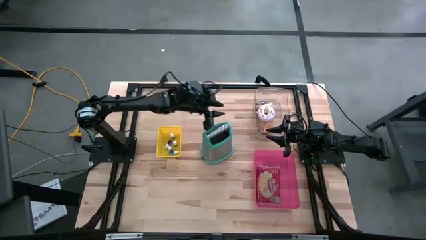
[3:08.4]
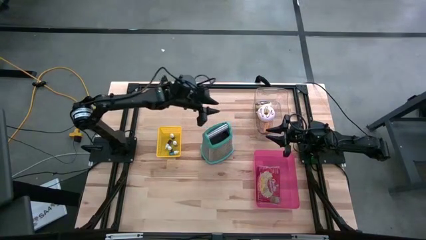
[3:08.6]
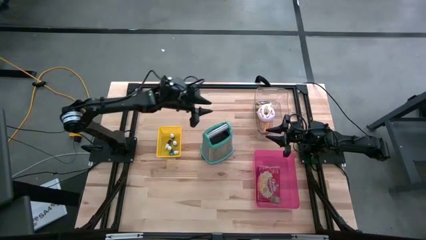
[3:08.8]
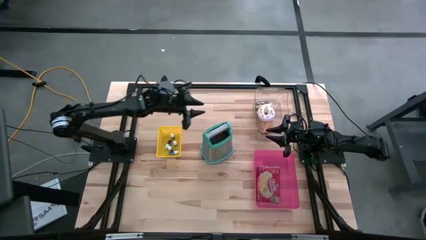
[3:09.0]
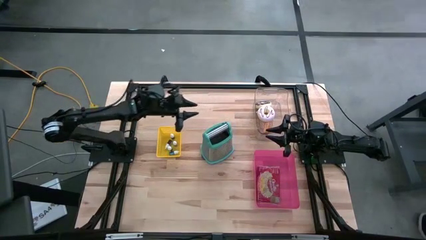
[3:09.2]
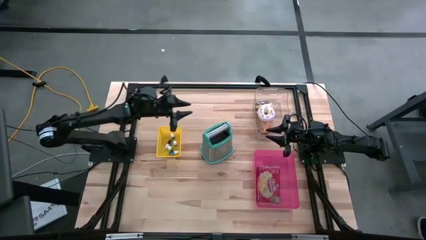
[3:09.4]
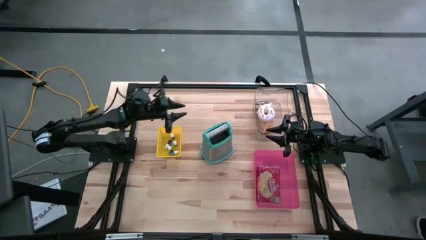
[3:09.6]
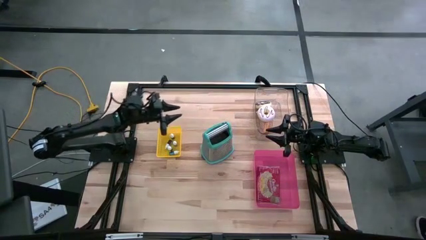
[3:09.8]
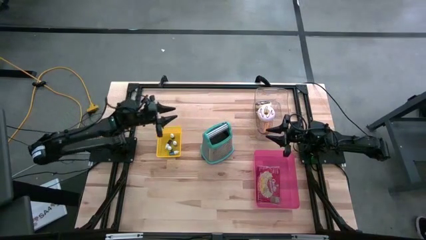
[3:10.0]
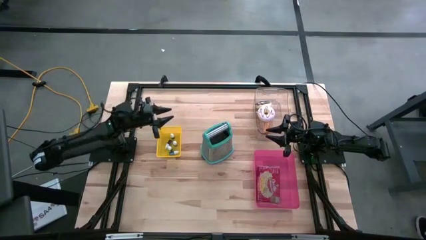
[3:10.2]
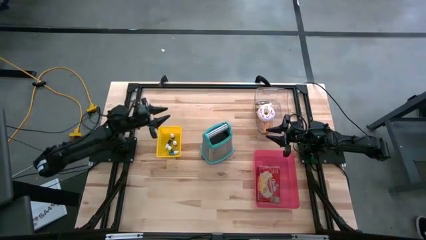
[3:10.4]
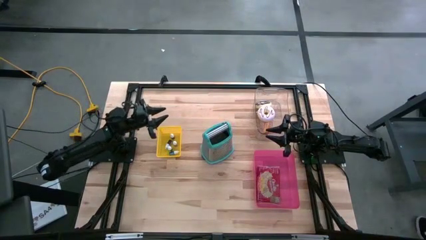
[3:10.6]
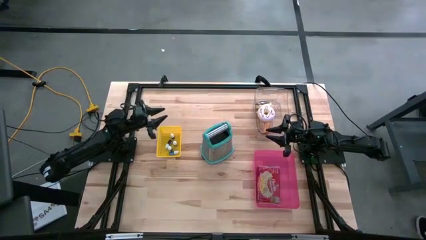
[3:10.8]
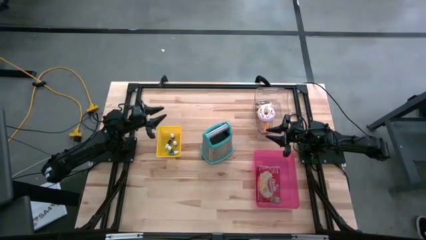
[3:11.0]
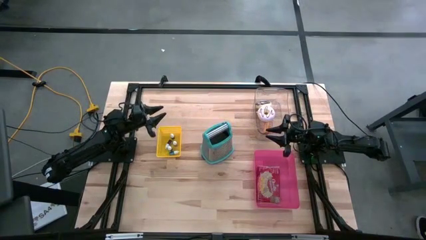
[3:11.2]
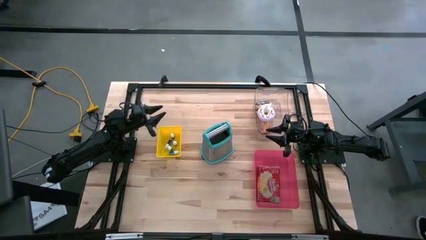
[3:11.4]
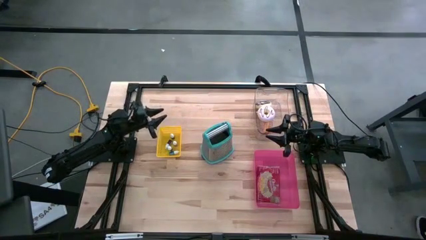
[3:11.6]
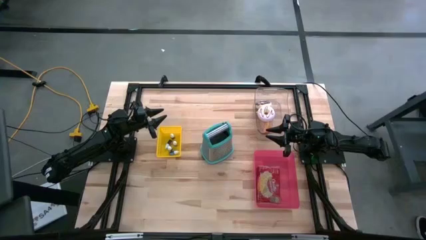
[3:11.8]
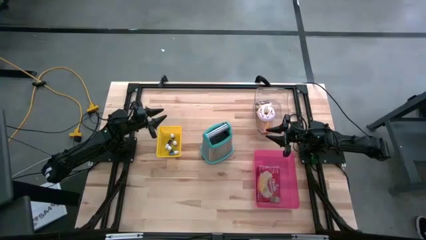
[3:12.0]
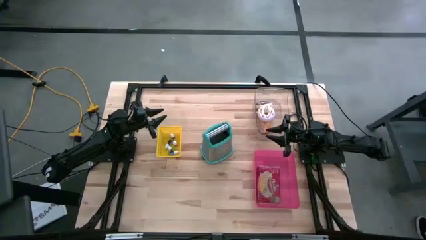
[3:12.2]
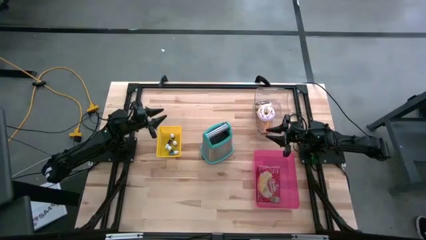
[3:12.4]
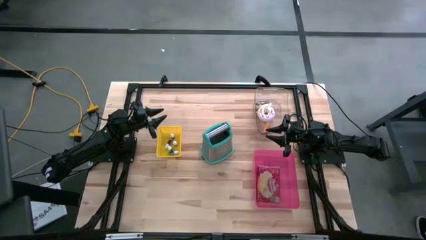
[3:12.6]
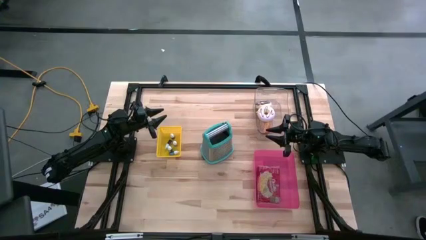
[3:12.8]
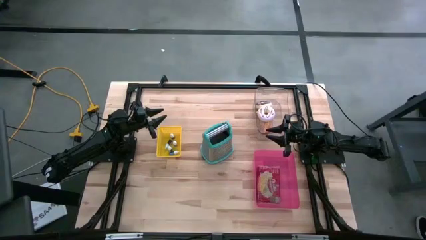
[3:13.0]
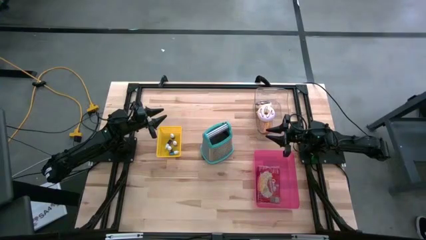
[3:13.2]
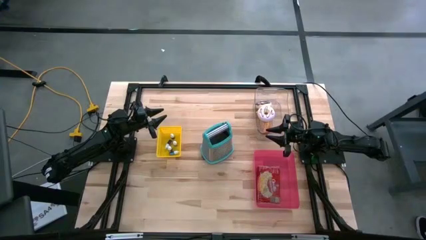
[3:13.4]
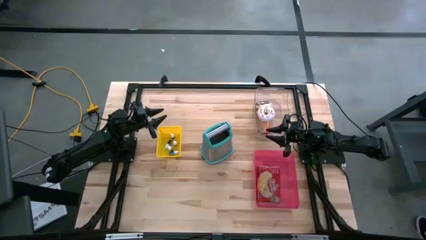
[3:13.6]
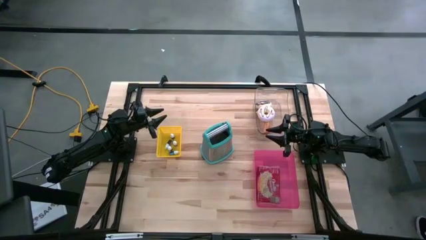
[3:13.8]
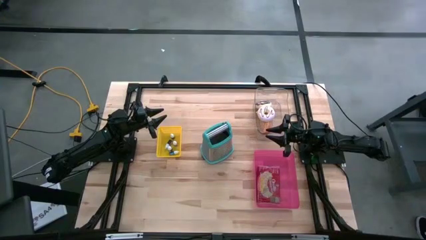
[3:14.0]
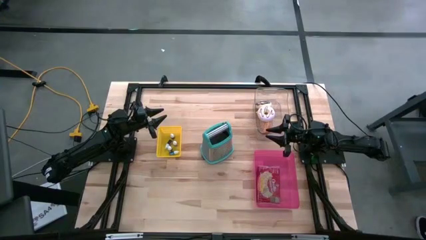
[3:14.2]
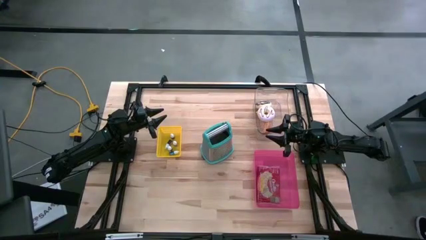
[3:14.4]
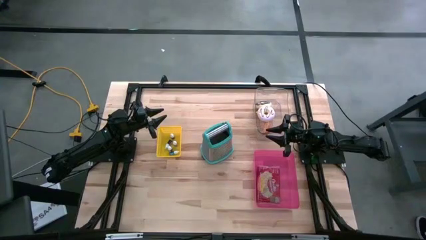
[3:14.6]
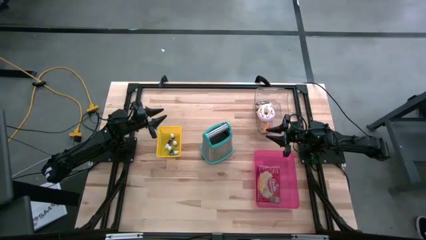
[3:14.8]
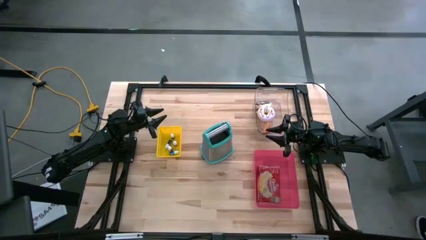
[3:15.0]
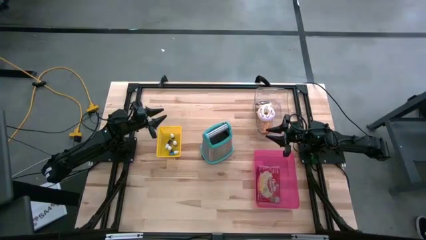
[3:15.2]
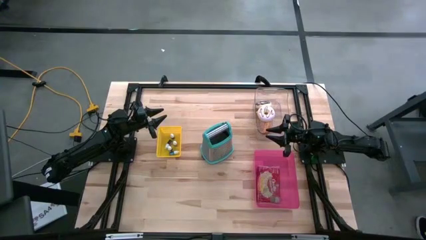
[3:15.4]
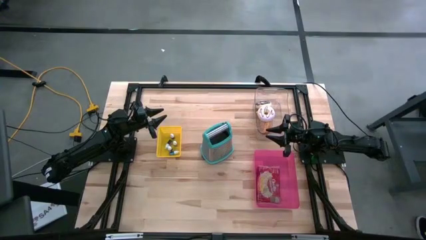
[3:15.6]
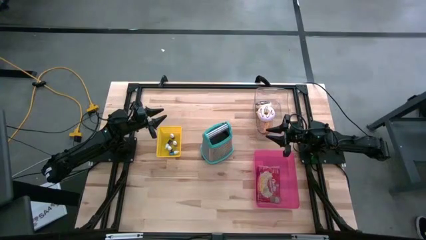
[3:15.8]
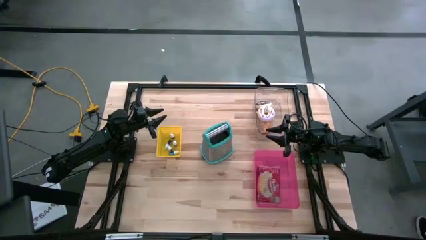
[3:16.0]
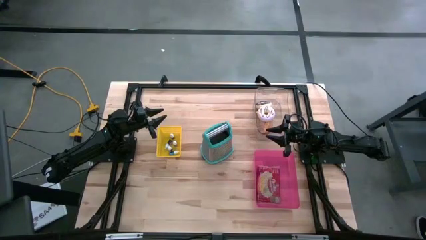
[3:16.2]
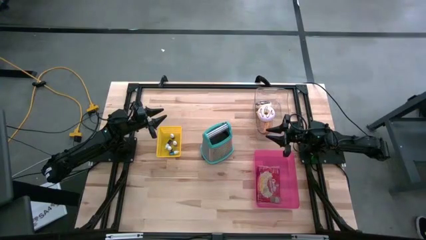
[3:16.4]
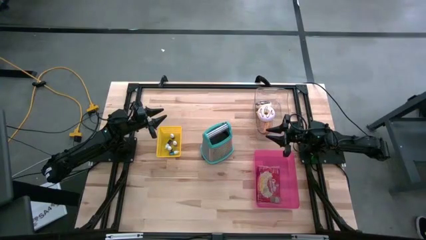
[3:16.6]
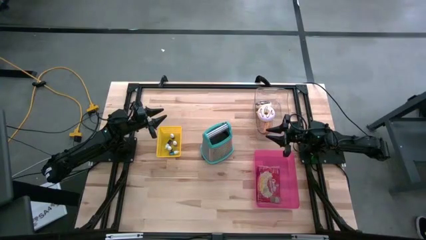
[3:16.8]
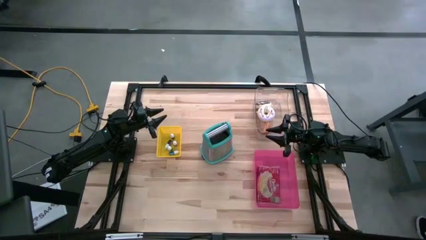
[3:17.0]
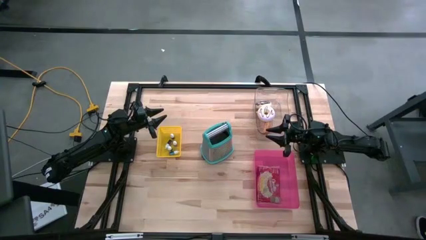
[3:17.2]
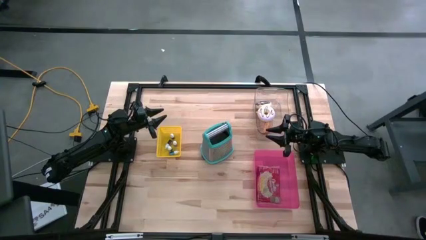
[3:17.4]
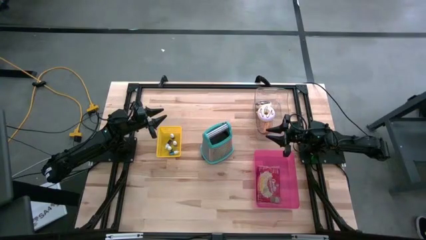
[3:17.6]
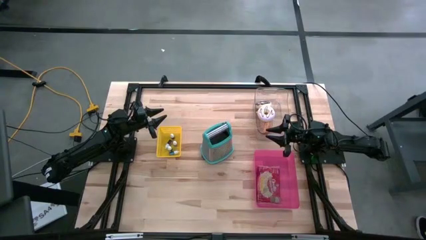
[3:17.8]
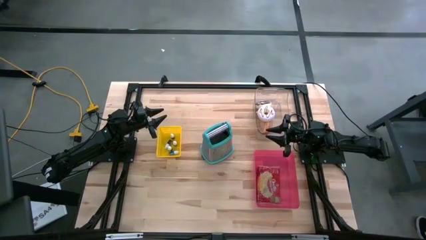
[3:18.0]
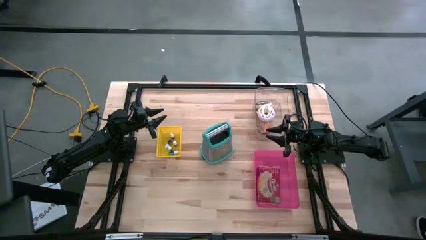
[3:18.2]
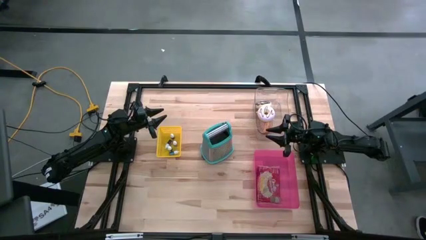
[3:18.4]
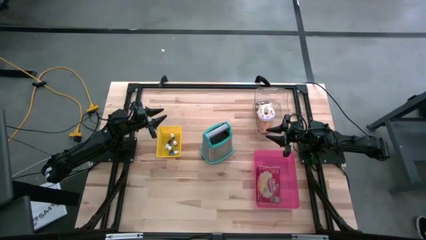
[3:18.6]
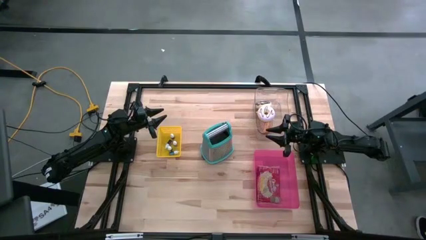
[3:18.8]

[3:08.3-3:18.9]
Return to Home Position
